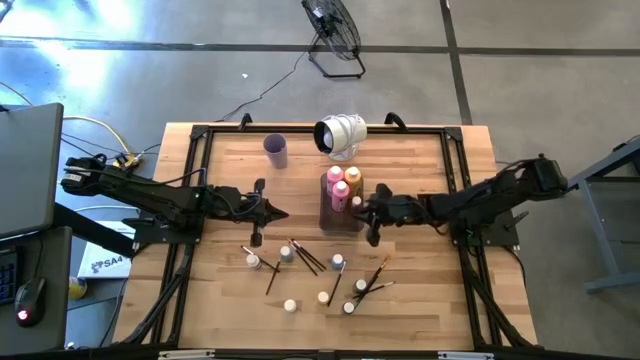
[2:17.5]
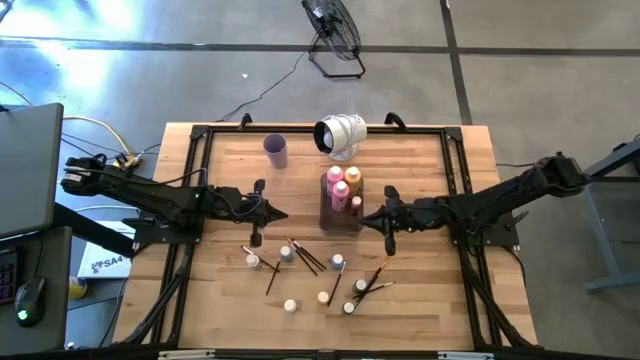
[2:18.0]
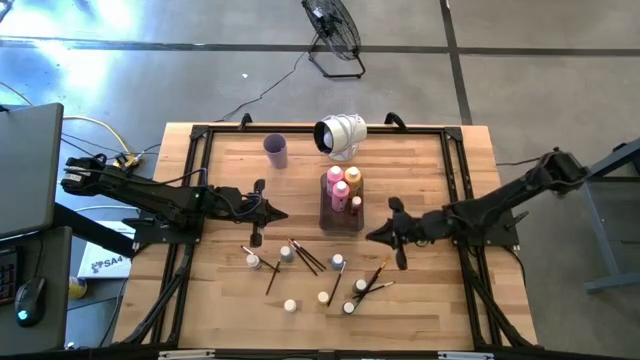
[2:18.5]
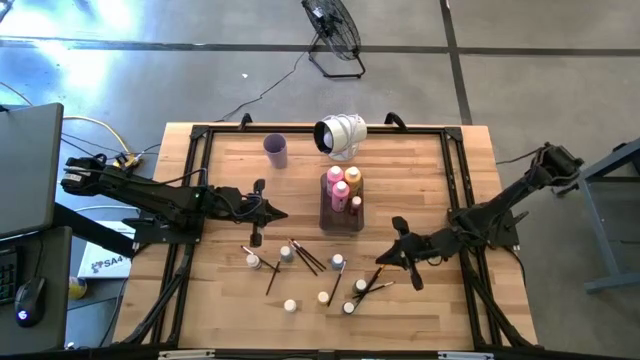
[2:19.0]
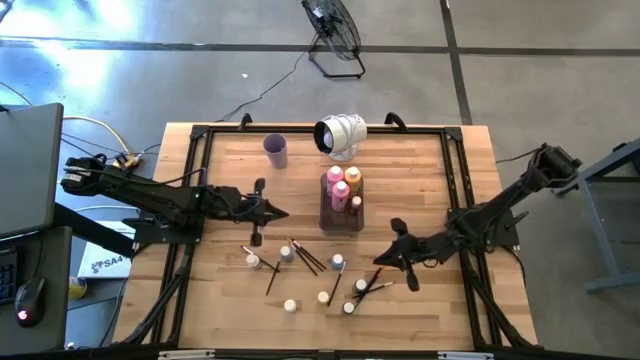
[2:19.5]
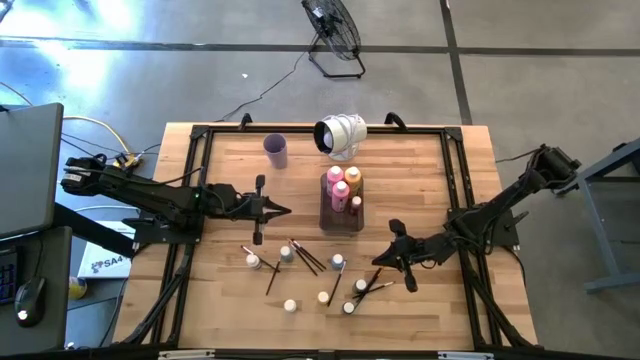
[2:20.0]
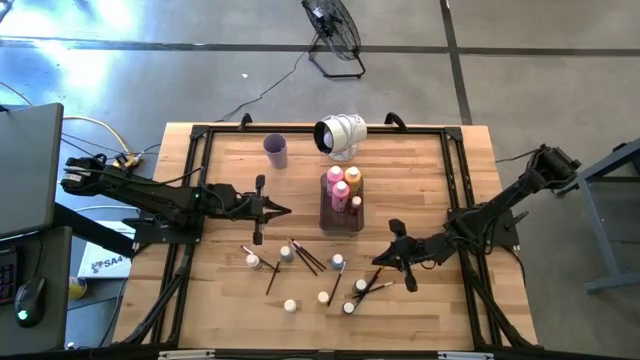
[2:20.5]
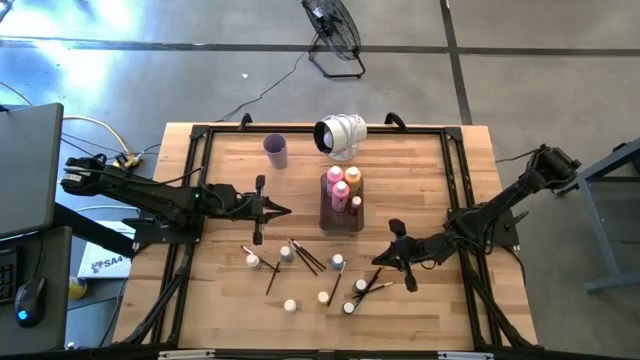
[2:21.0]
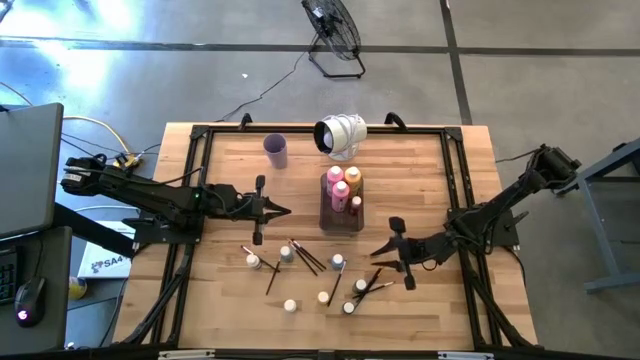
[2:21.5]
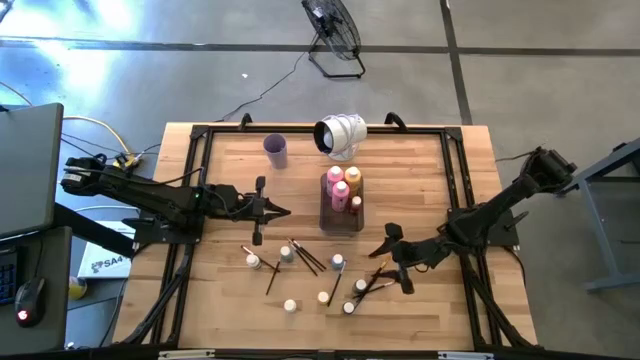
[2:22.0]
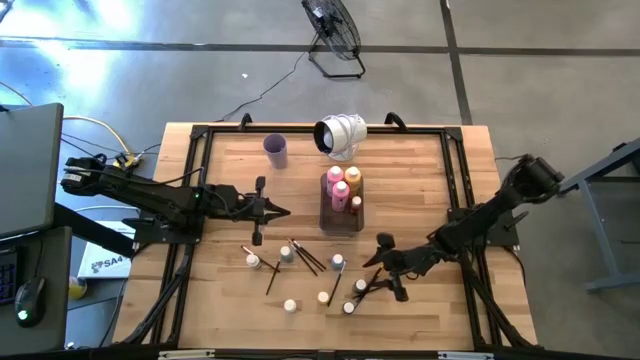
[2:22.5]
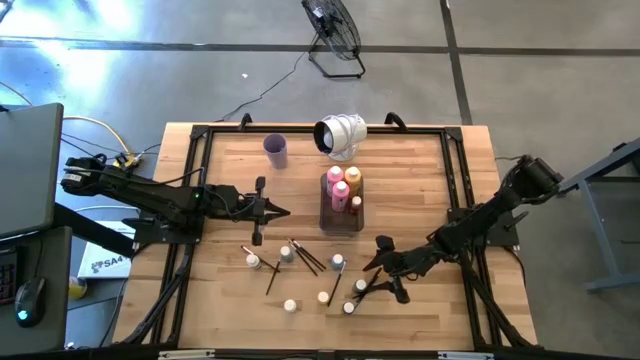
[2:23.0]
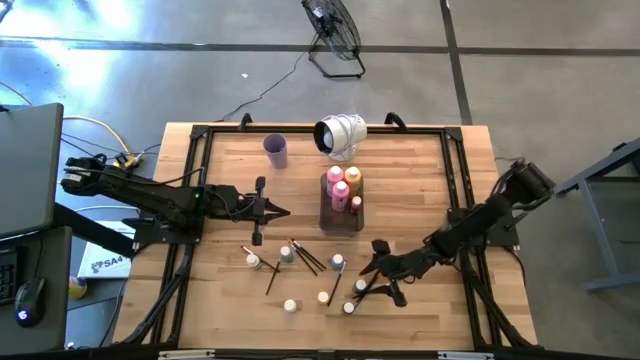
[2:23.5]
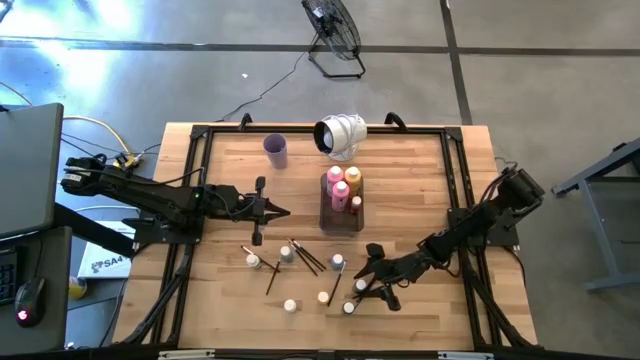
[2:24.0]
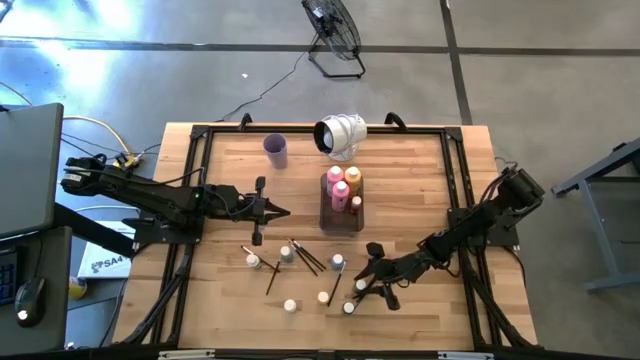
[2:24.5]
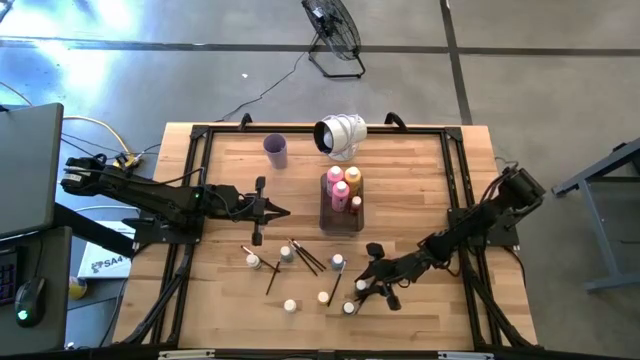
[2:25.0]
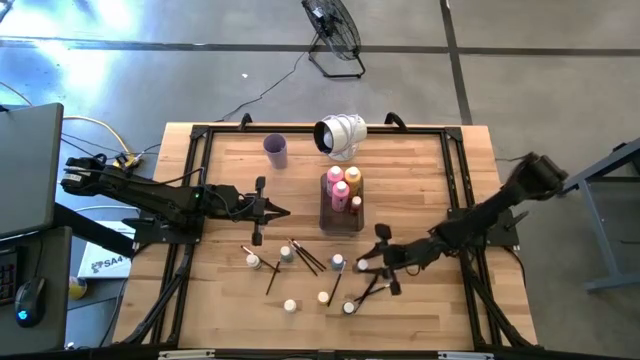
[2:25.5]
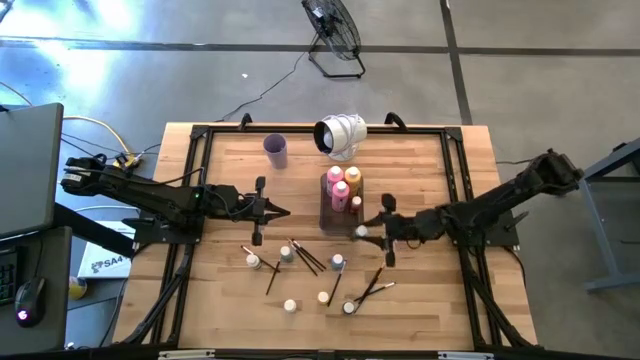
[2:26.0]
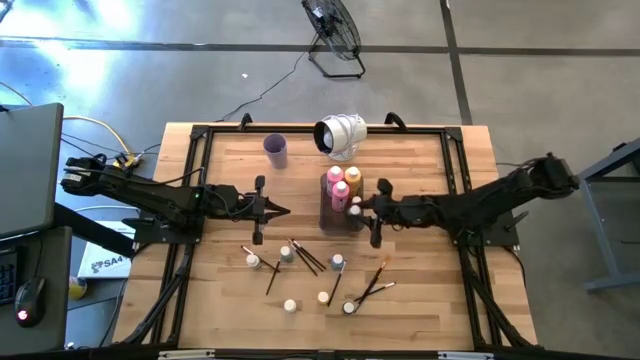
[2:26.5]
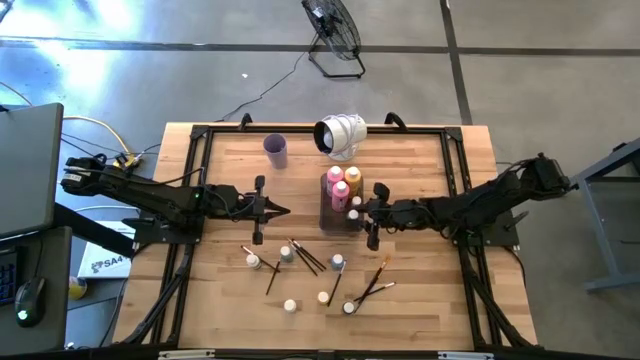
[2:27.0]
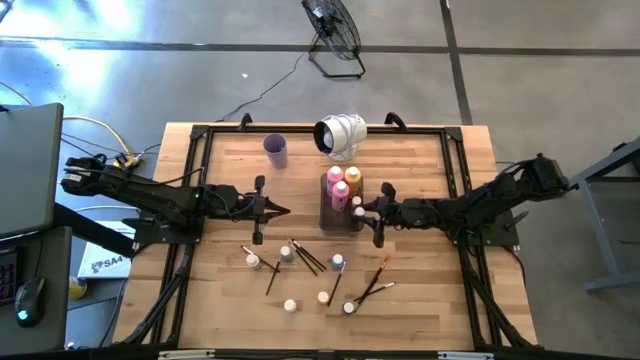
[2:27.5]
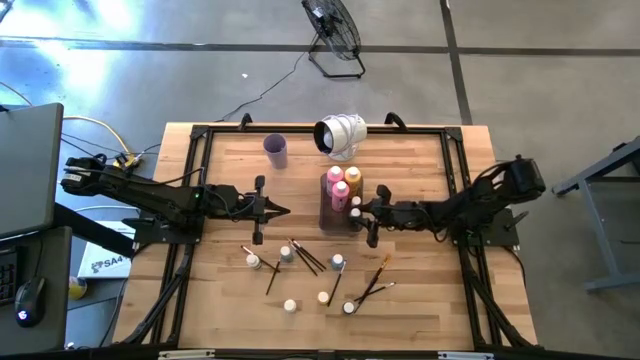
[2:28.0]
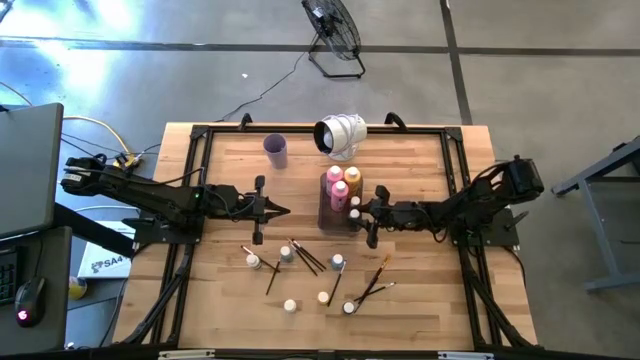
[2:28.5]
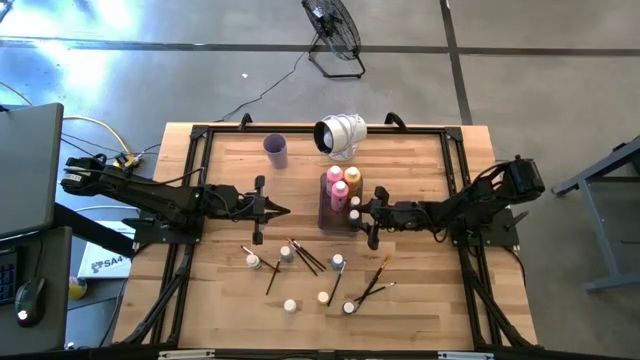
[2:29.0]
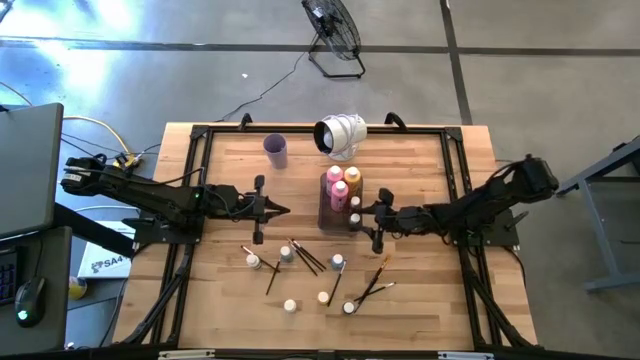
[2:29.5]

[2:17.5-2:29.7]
Task: Pick & Place Paint Supplies
Put the green paint bottle into the black bin

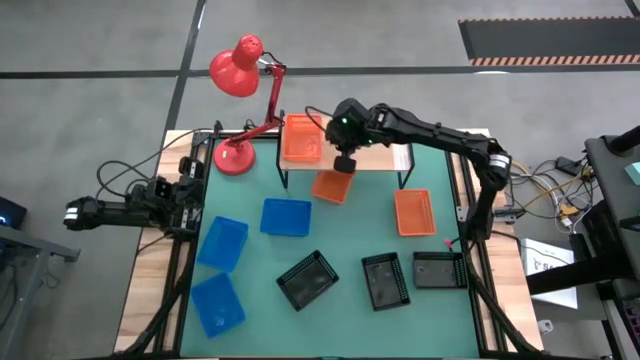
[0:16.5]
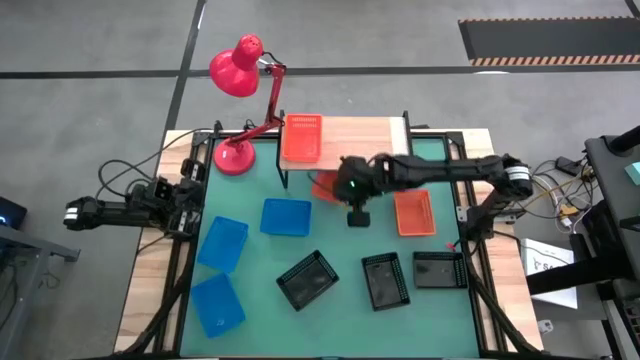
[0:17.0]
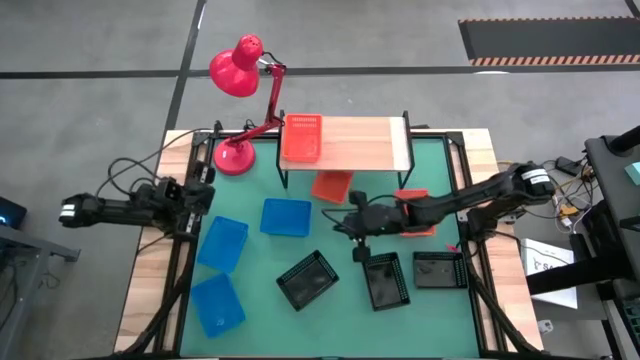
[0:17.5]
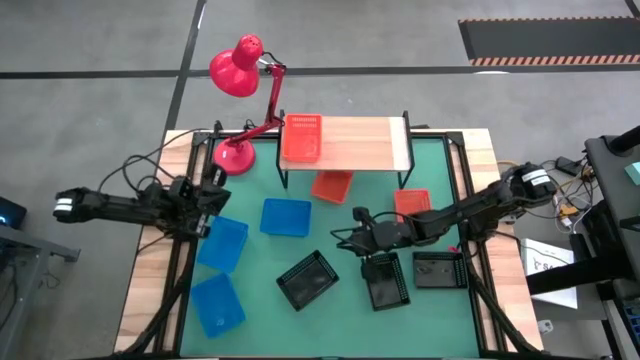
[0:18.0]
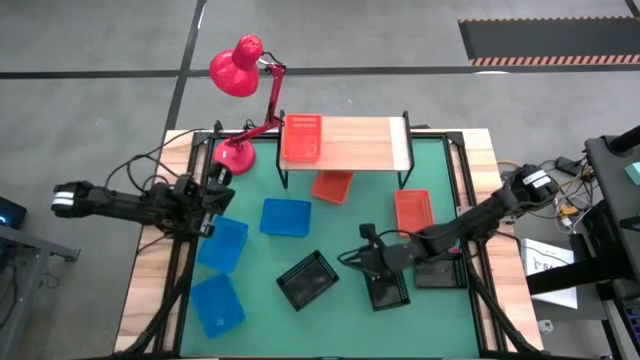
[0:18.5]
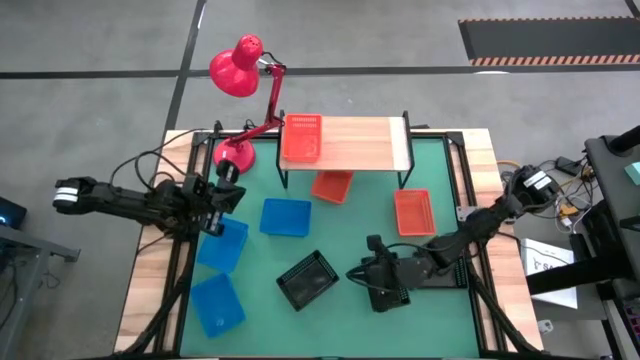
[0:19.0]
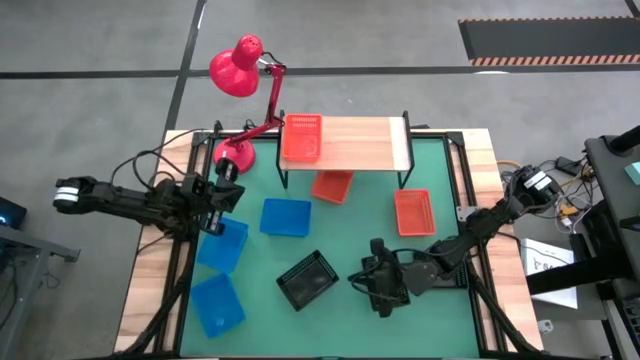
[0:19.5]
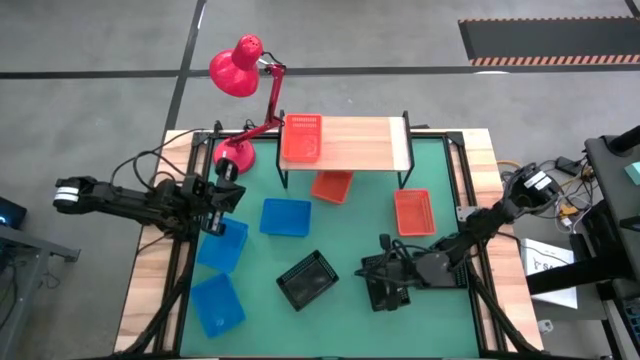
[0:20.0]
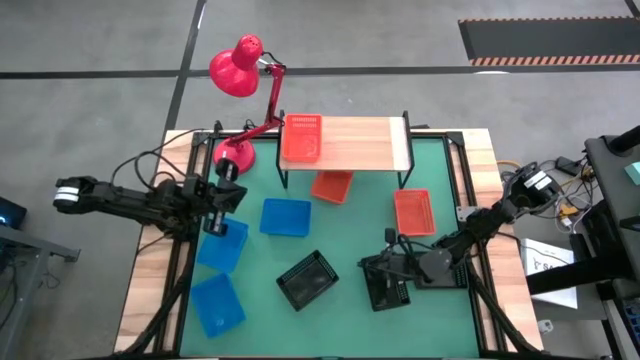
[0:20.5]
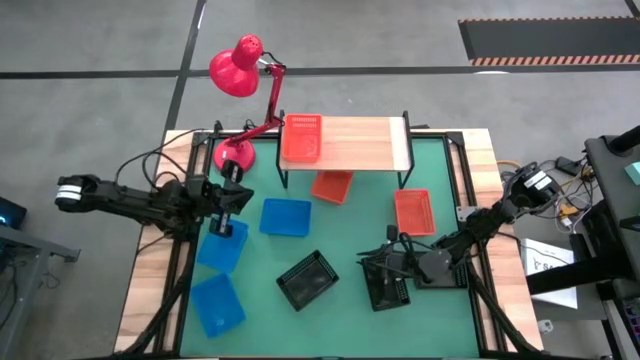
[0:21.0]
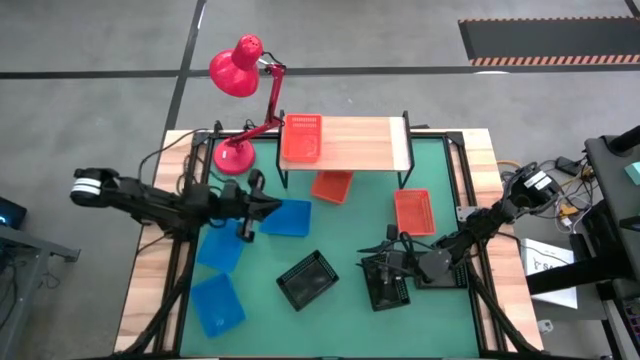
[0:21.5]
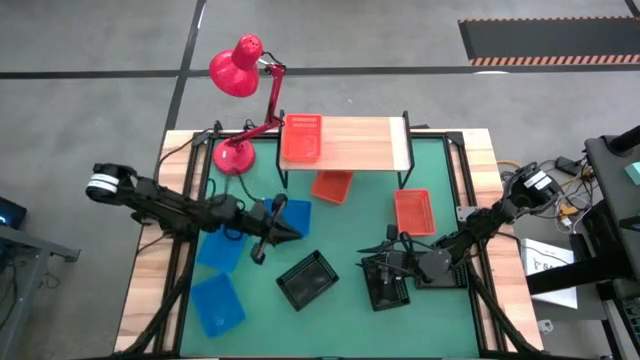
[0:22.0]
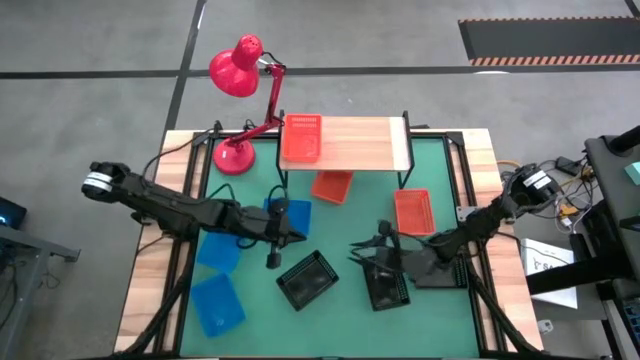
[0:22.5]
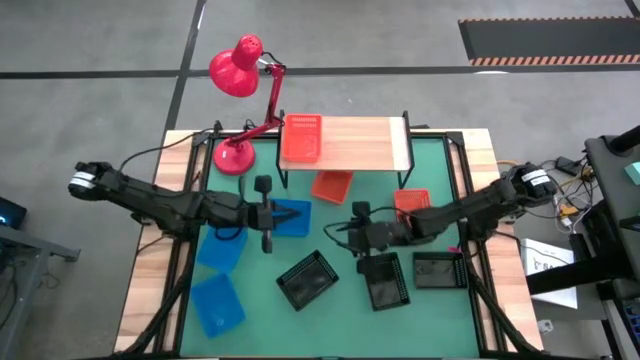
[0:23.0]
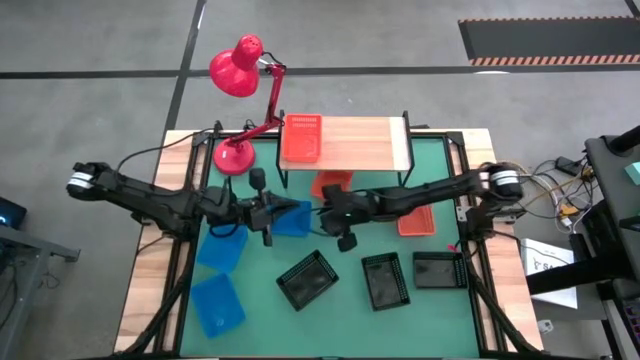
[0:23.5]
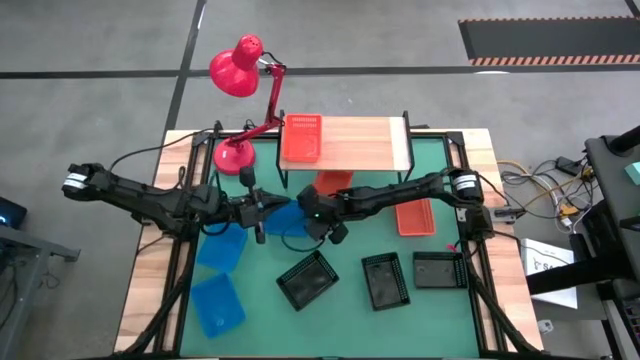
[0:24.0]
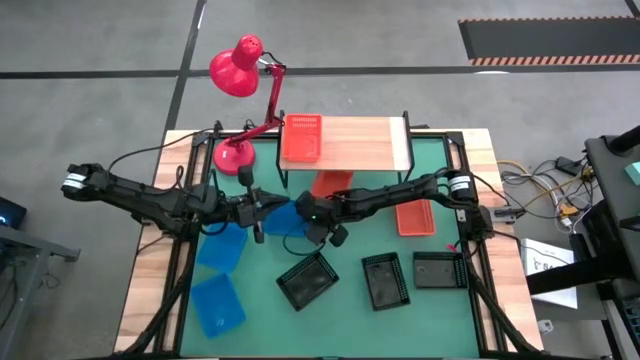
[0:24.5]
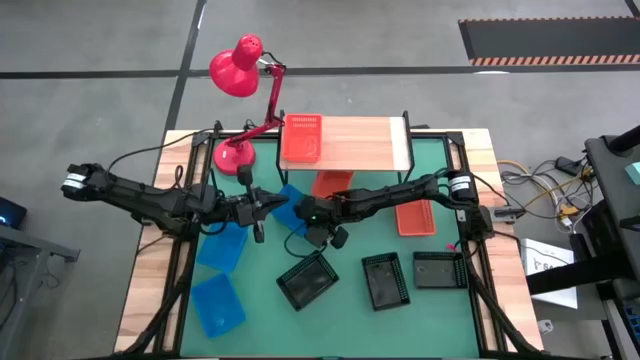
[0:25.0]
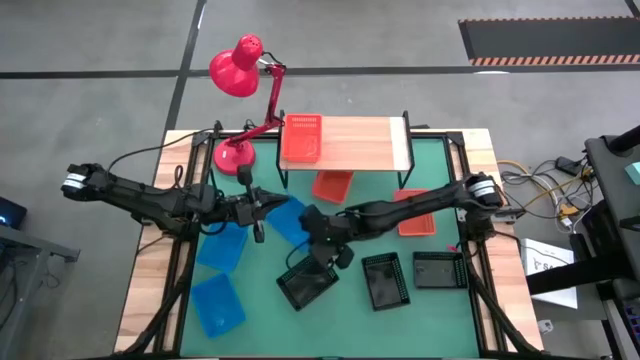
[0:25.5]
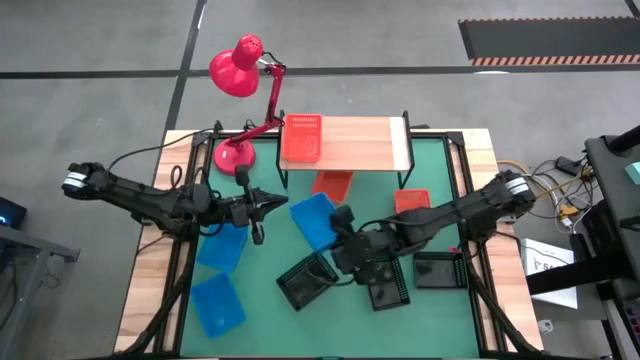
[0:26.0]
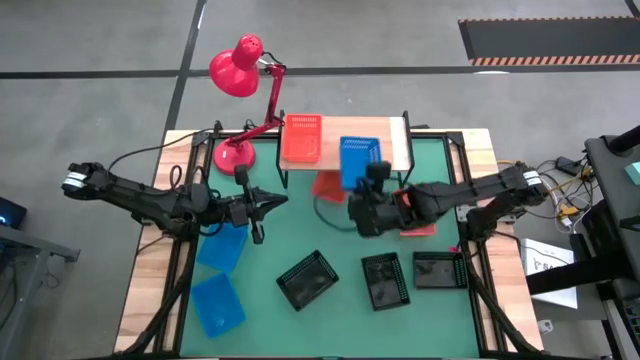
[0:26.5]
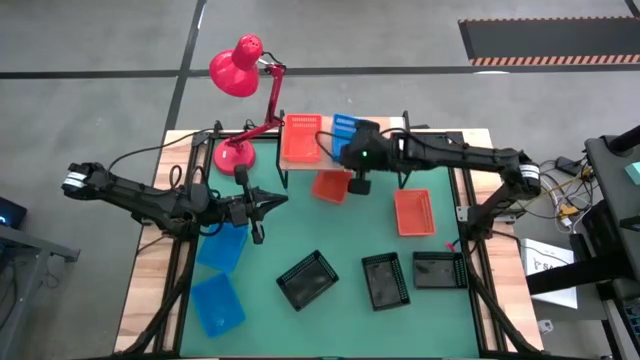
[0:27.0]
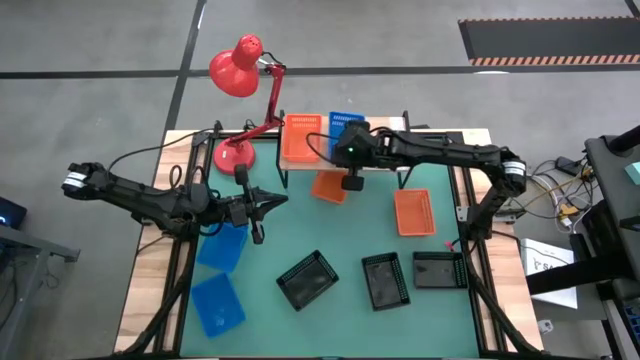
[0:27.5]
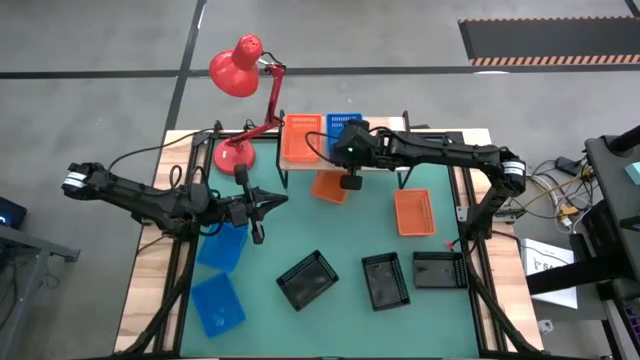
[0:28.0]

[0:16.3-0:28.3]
Task: Stack baskets on shelf by color
Put the top right blue bin on the shelf
